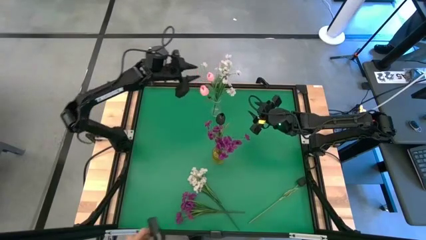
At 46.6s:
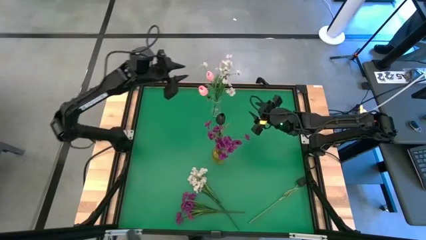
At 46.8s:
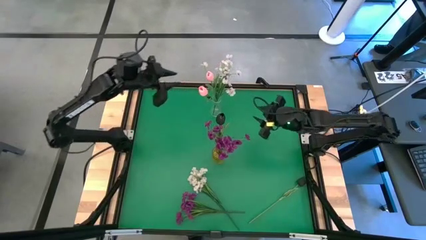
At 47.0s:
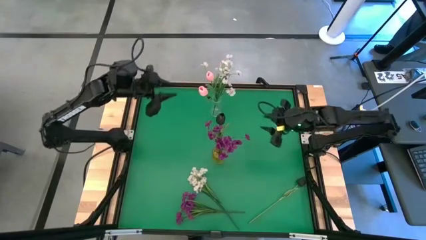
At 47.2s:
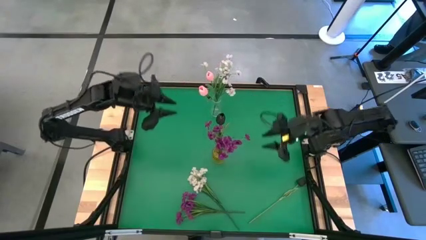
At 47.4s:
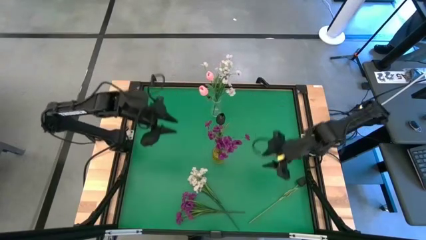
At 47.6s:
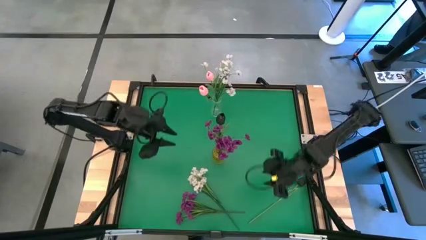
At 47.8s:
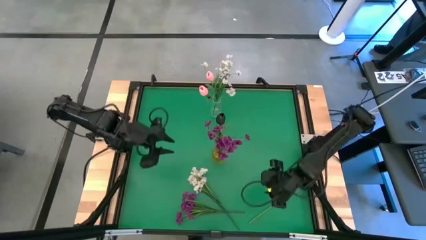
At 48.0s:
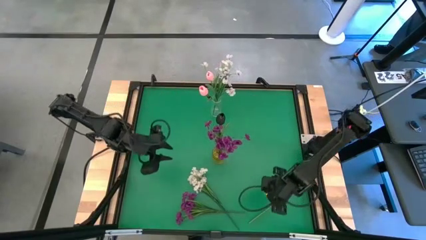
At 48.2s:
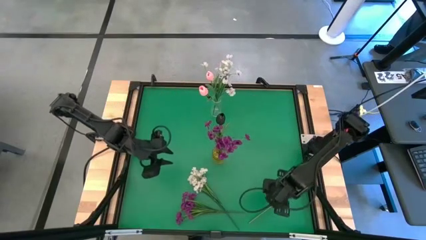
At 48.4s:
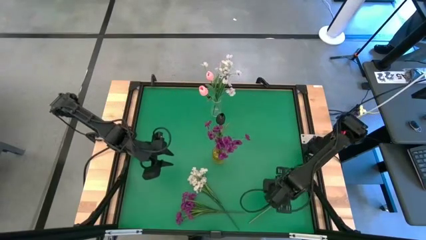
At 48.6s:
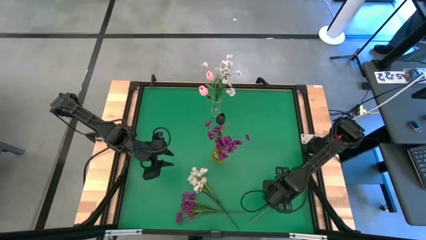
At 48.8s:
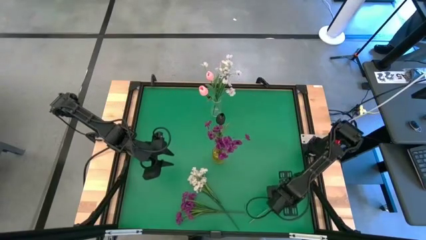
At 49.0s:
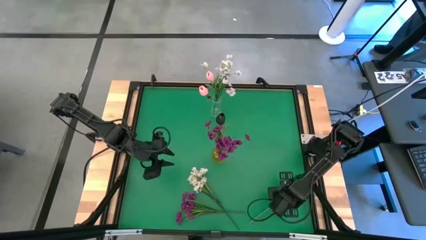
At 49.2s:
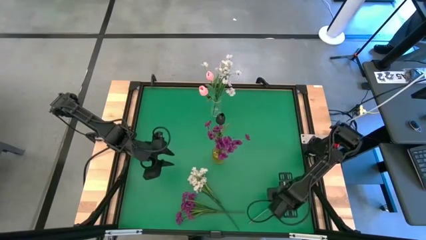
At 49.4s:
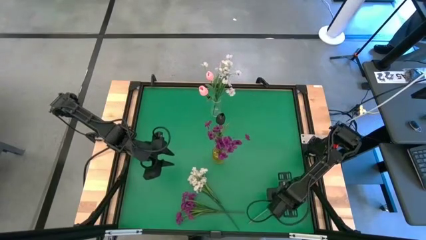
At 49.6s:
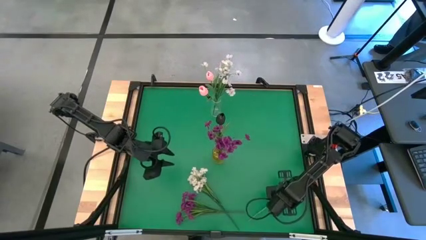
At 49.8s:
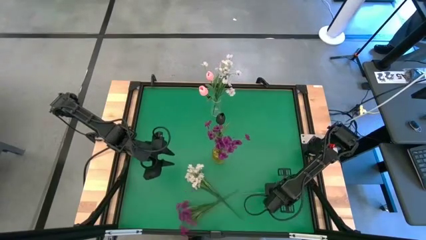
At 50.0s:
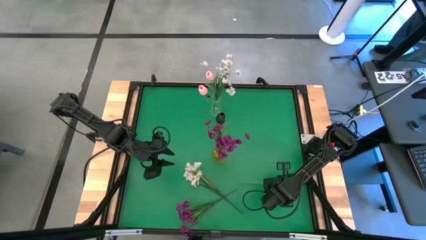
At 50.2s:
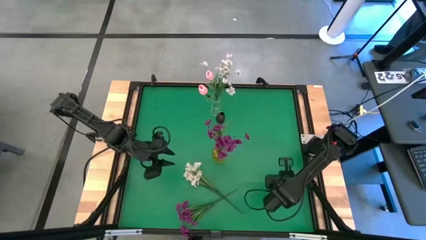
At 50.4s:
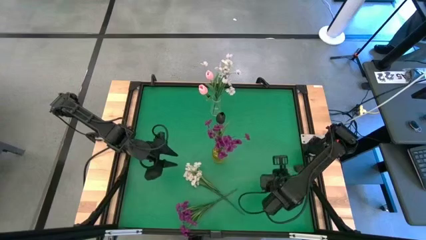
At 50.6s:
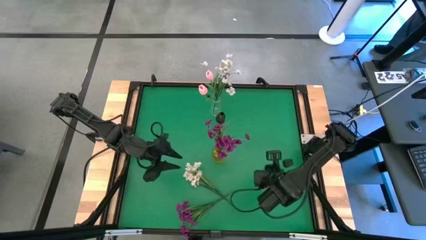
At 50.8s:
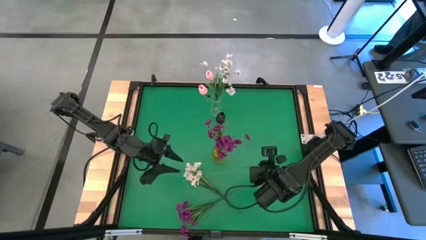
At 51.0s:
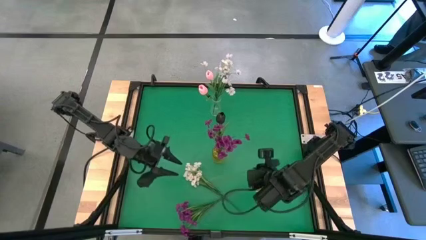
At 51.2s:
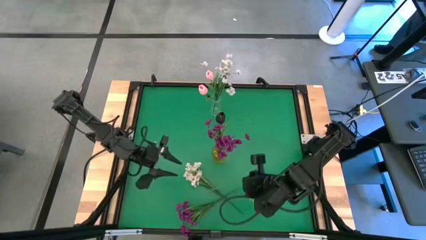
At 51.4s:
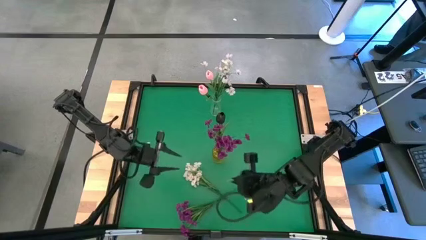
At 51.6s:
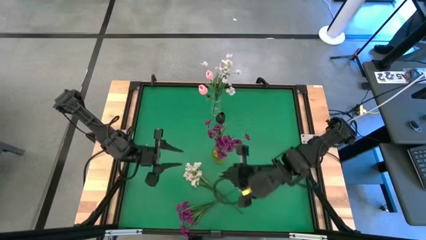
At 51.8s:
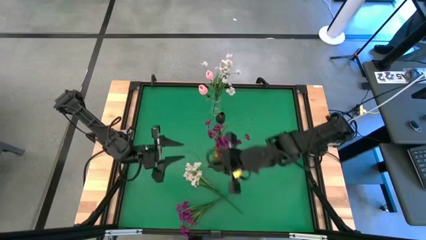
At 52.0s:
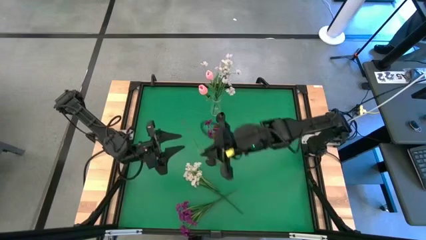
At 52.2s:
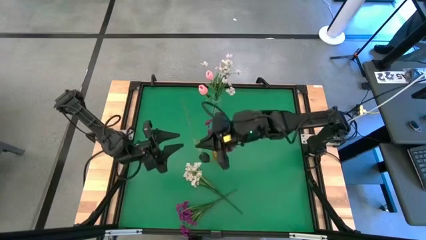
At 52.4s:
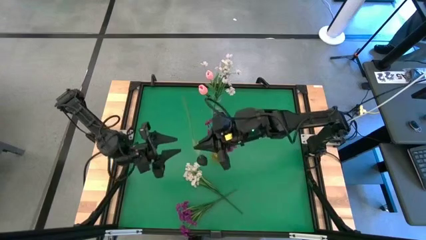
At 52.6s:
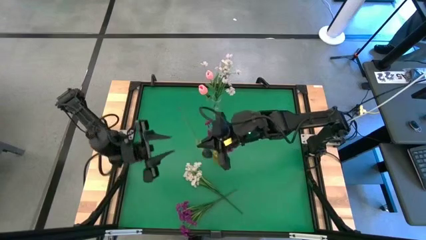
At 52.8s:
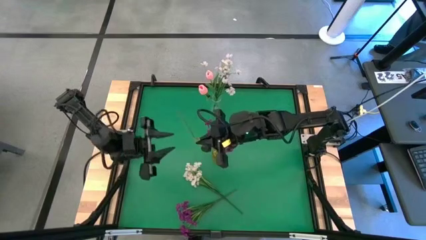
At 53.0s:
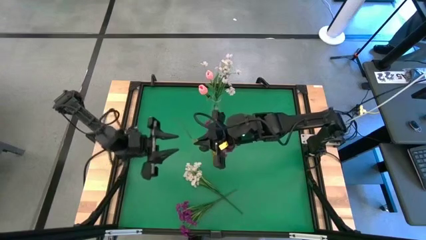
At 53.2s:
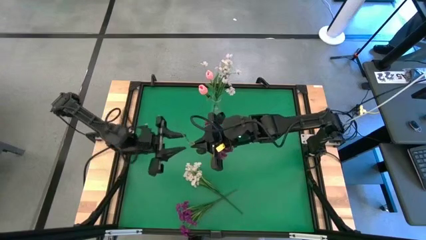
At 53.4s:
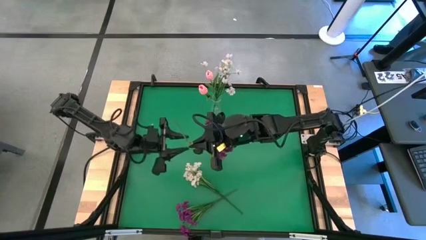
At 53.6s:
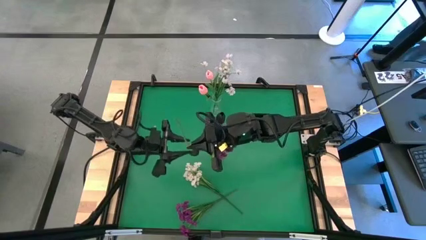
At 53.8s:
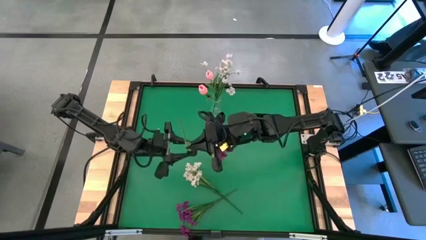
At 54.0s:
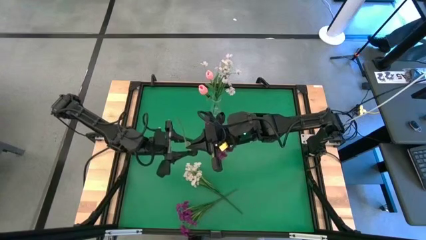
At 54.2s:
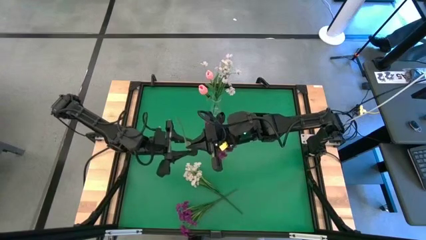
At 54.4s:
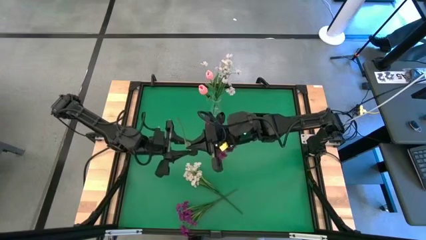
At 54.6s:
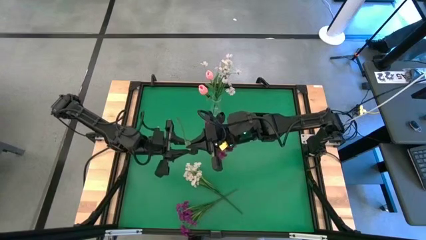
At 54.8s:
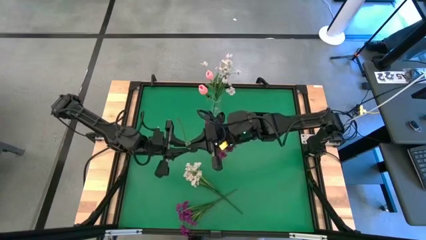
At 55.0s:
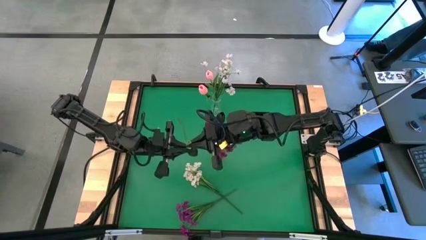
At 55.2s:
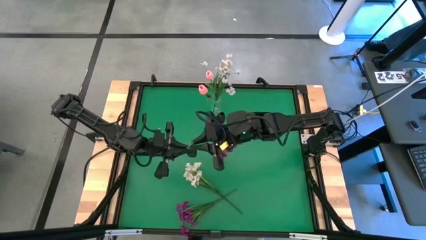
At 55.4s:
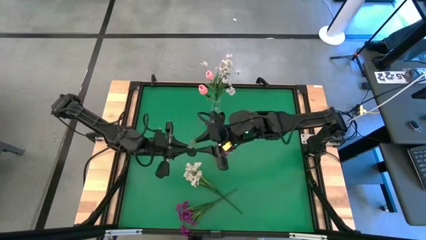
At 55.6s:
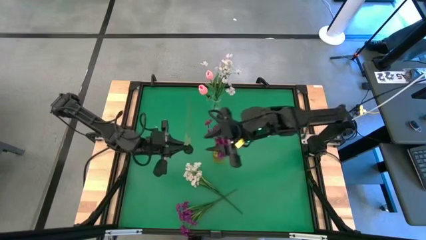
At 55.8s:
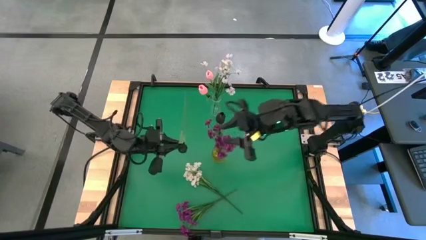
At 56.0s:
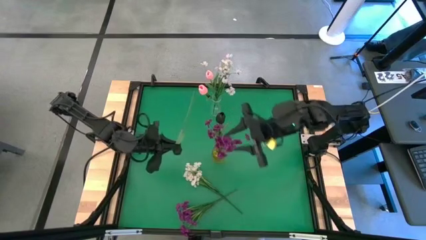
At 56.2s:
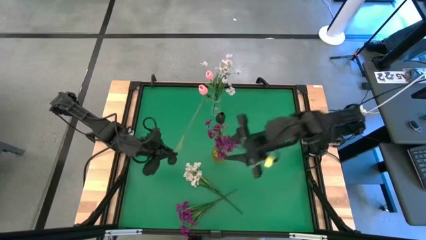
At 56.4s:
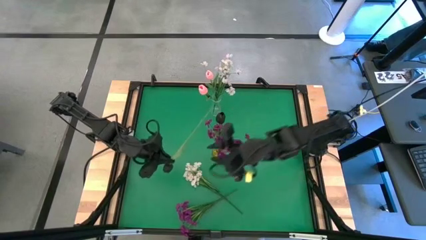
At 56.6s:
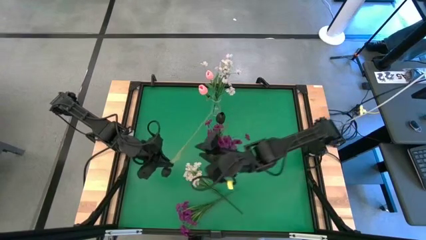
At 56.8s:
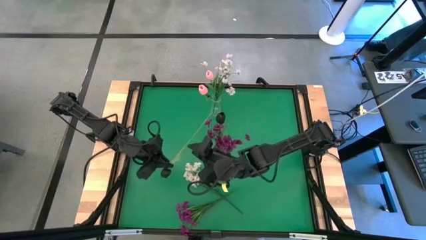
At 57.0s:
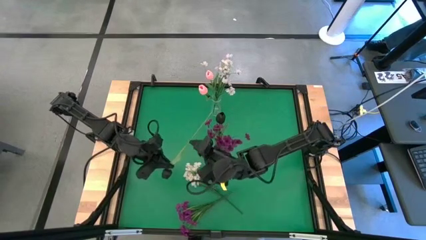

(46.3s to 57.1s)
Task: Sort flowers into vase by color
Put the black flower into the yellow transparent vase

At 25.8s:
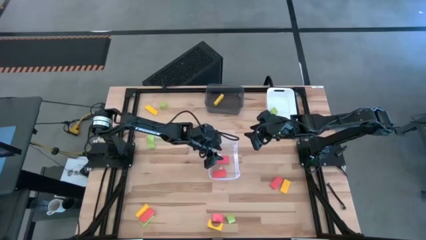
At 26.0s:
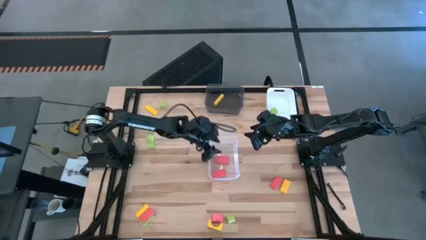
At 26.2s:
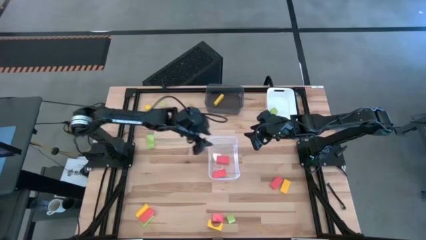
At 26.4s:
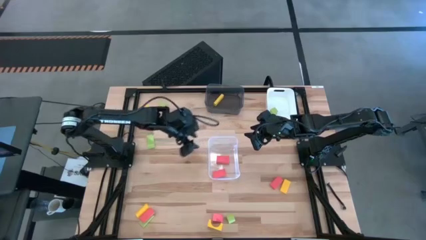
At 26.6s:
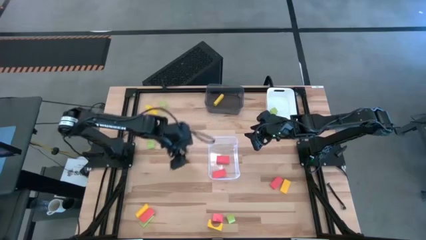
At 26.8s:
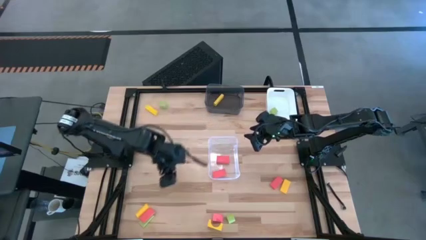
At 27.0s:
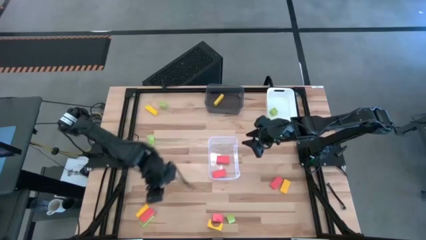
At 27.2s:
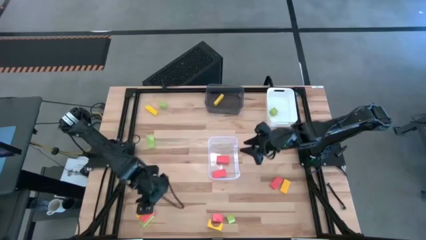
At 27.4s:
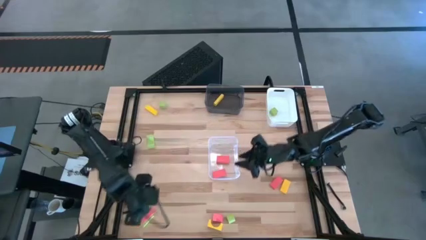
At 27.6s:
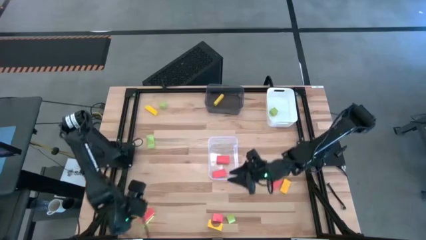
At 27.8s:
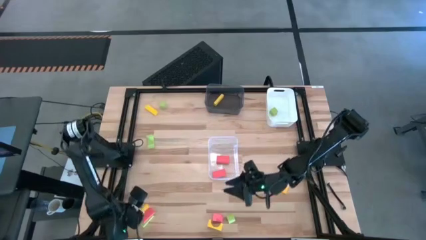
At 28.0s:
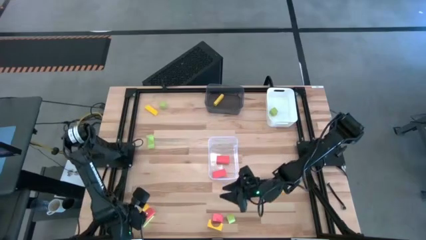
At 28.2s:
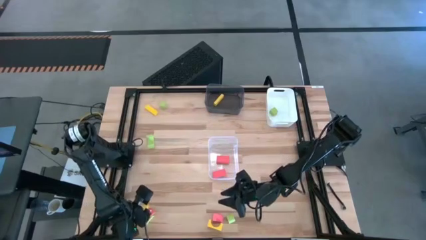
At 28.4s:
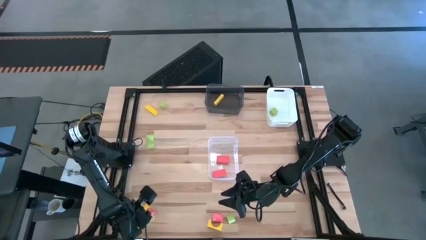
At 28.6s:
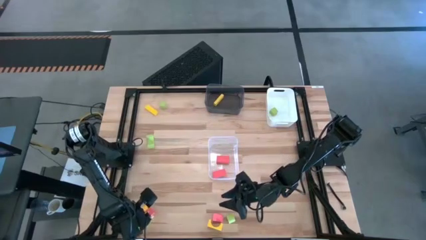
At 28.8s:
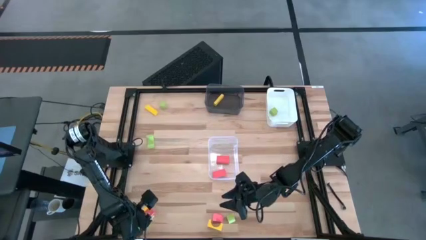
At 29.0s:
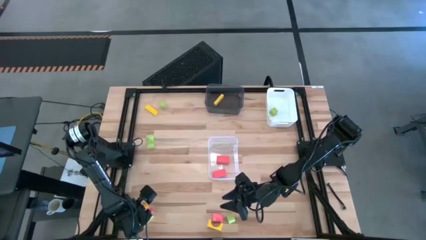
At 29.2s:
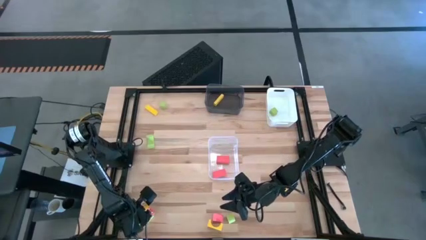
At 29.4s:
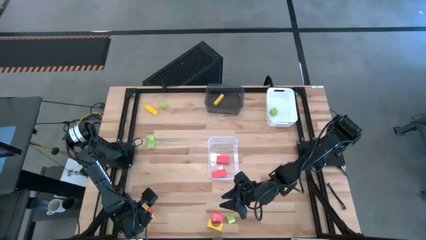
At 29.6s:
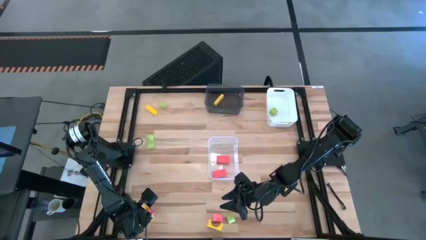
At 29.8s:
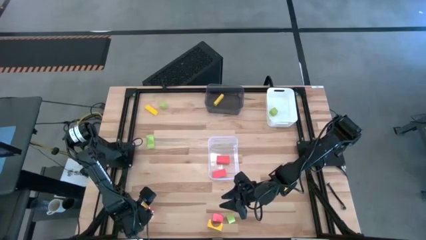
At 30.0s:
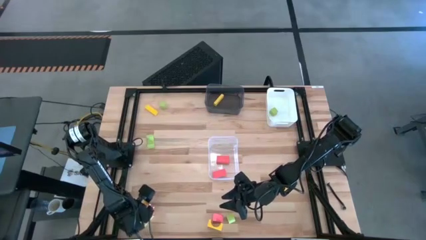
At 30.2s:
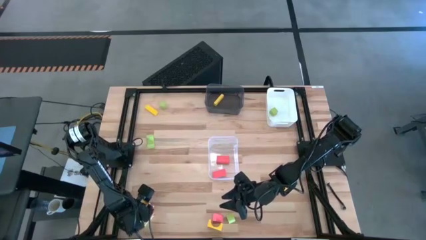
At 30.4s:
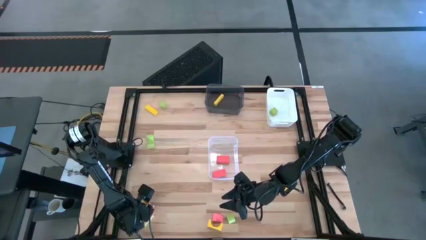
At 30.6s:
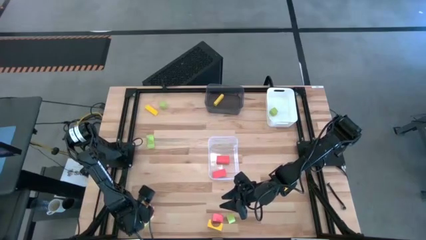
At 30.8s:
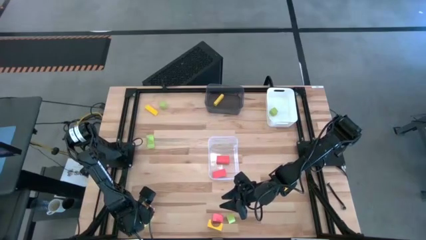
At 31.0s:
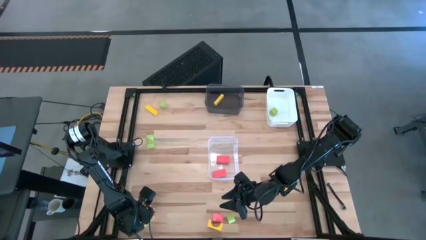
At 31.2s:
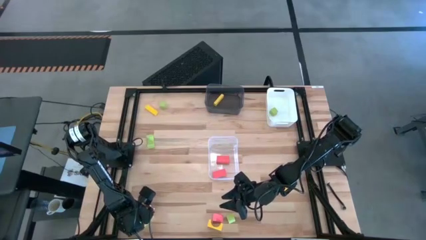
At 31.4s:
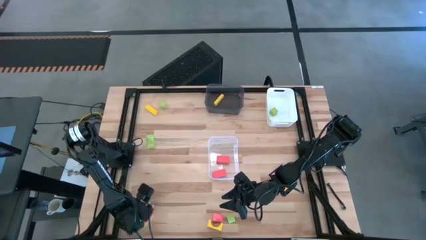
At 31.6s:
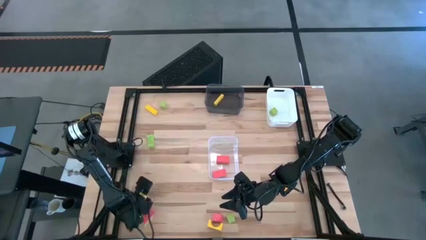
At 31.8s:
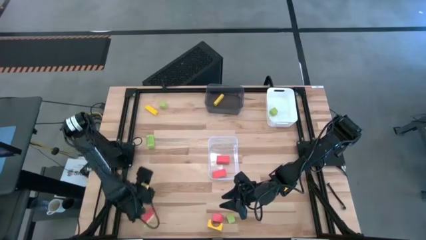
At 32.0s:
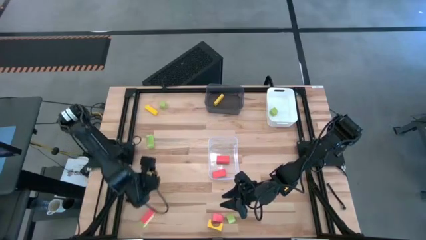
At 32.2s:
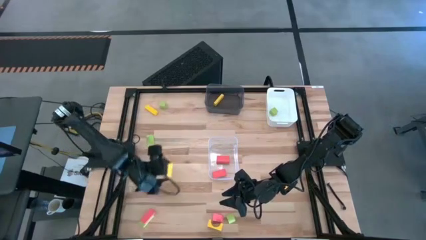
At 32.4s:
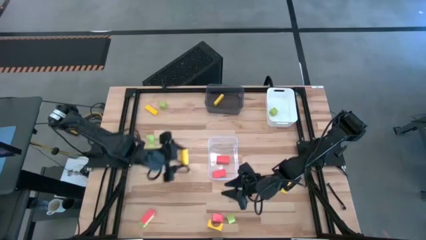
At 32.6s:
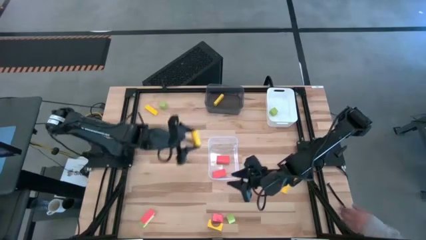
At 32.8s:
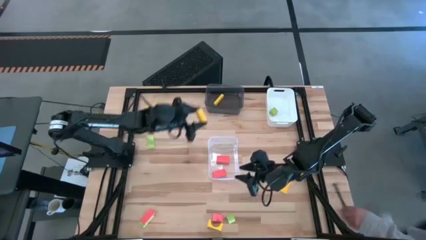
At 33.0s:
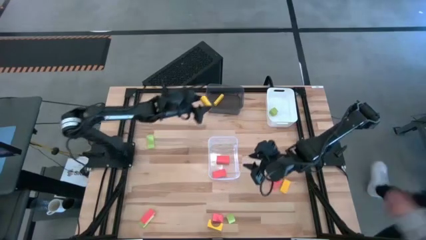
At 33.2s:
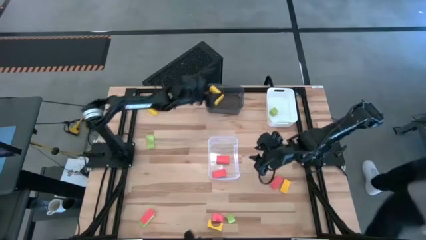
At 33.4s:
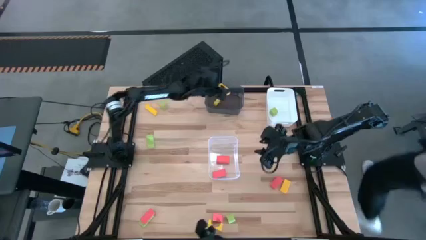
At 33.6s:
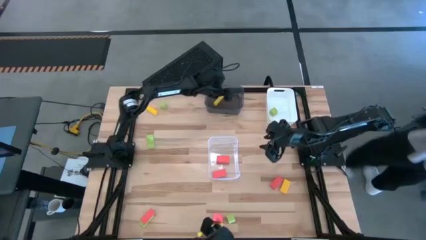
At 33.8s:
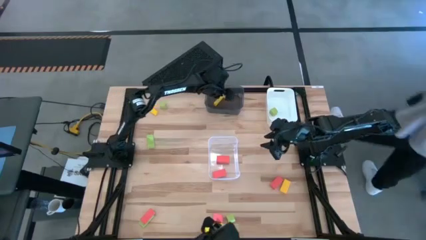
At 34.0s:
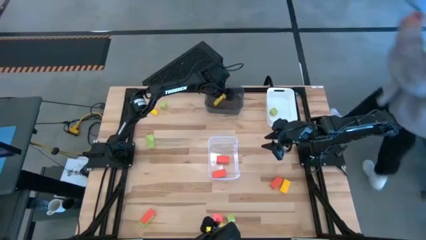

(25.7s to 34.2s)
Task: Sort & place blocks by color
Put the yellow block into the black bin
